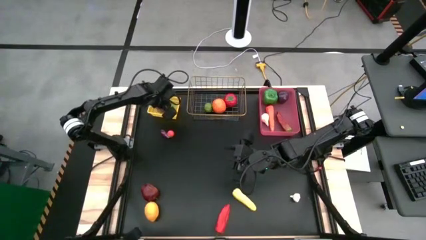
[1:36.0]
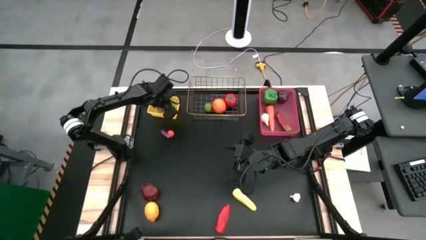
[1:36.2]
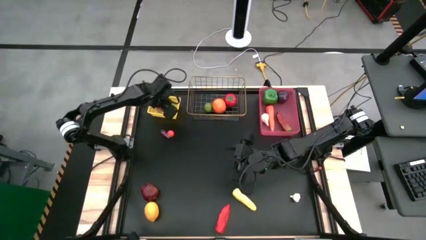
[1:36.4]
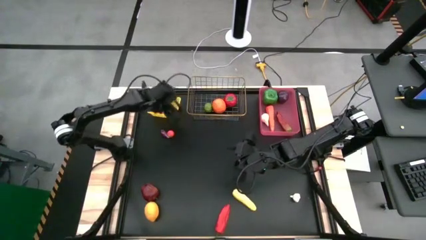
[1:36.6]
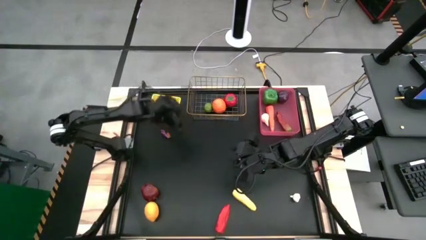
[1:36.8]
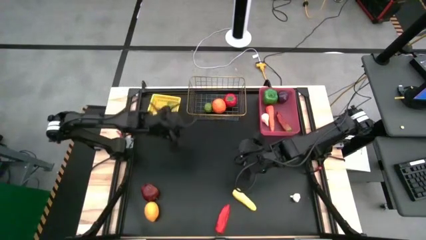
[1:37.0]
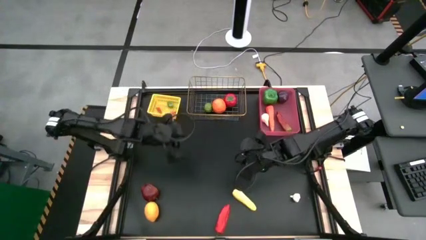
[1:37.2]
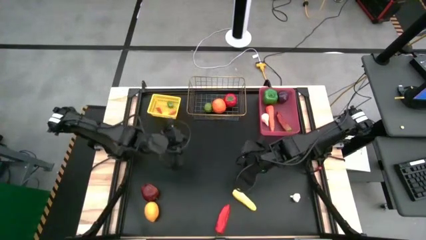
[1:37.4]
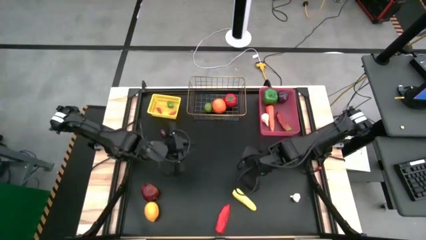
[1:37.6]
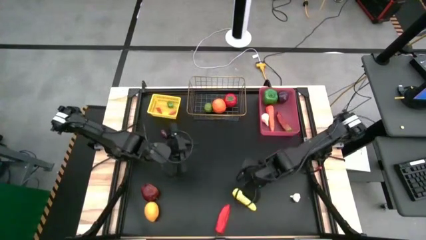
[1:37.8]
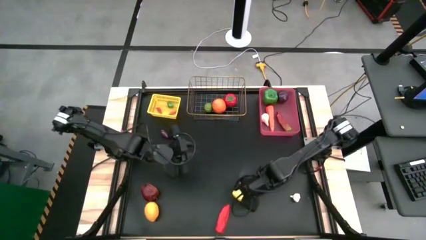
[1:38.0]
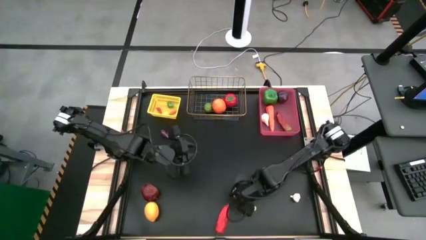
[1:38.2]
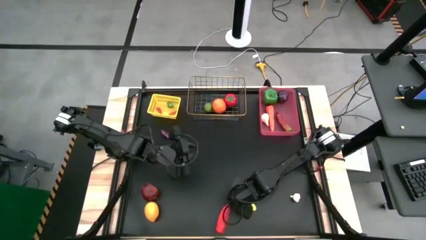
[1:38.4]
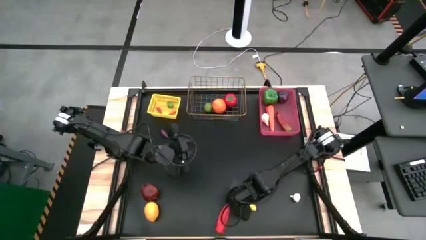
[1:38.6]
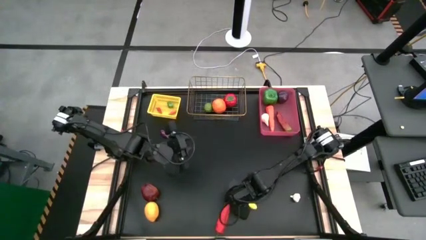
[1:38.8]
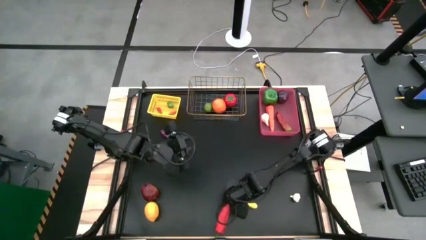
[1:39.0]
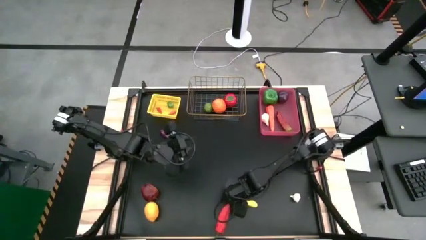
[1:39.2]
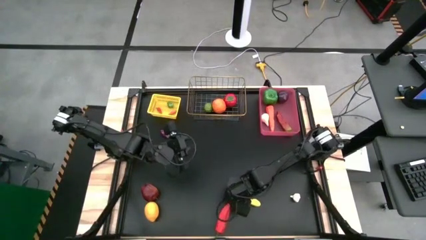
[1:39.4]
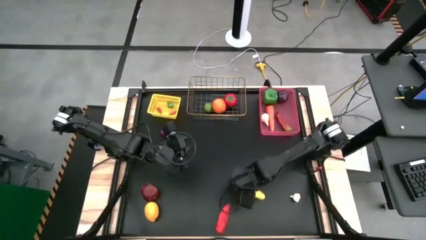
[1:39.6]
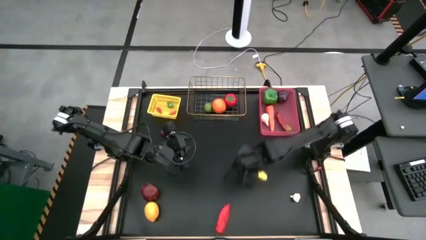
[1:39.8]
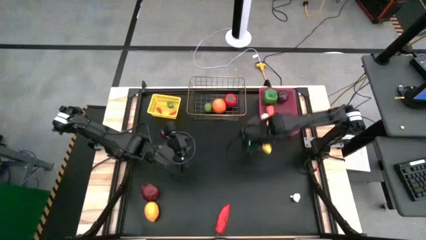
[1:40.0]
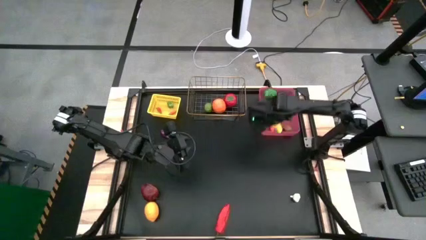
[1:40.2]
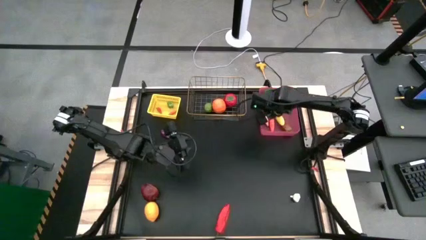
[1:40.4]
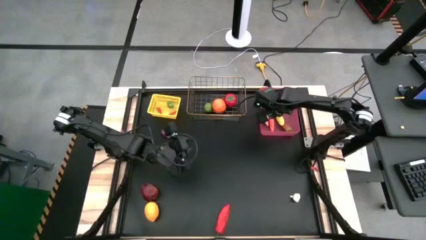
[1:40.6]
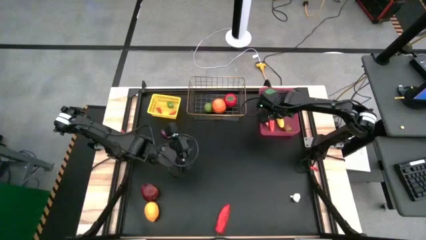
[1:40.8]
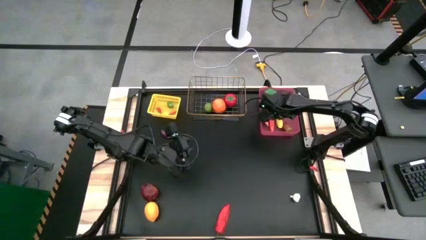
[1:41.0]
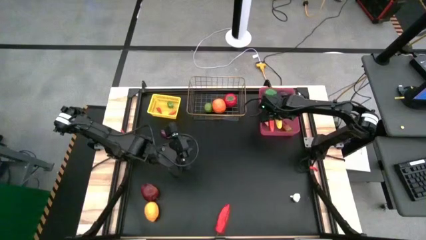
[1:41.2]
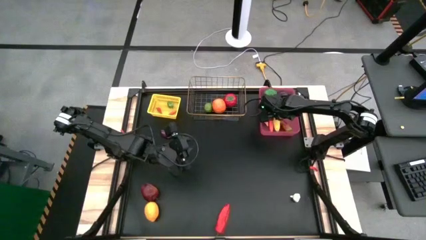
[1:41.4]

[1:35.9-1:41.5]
Task: Sort produce into baskets
Put the large yellow corn into the pink bin

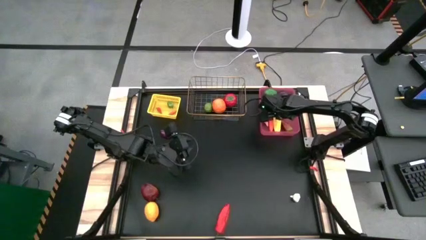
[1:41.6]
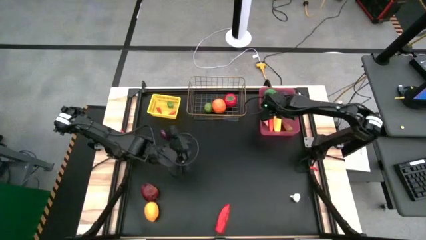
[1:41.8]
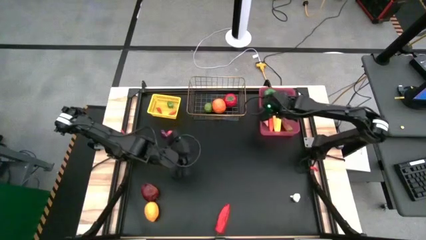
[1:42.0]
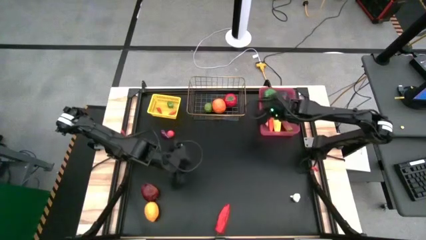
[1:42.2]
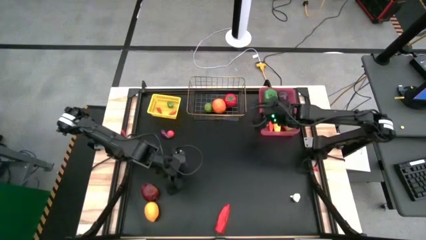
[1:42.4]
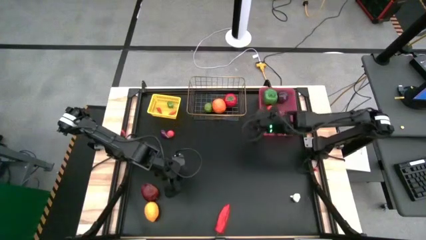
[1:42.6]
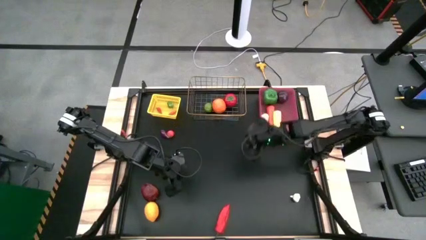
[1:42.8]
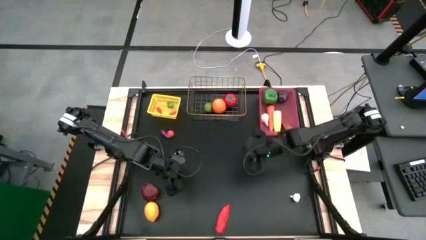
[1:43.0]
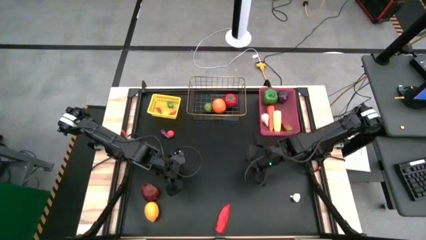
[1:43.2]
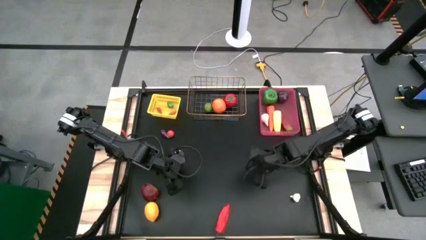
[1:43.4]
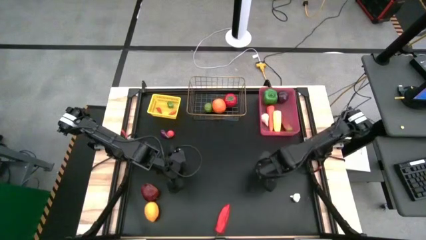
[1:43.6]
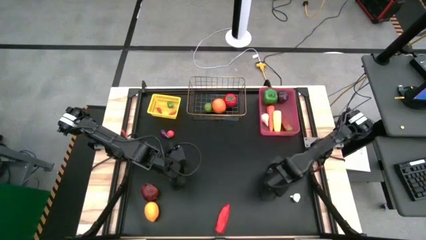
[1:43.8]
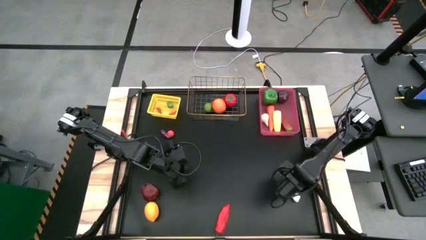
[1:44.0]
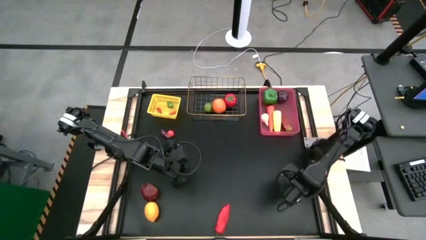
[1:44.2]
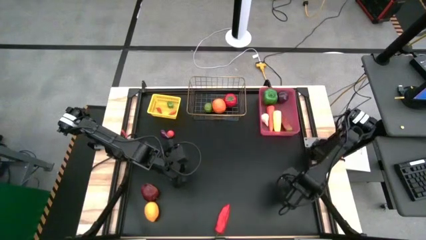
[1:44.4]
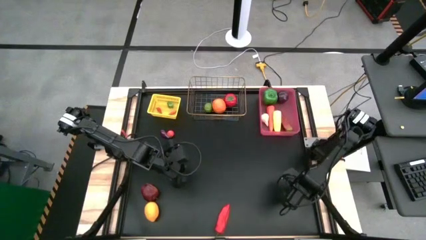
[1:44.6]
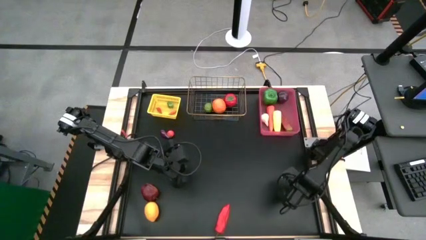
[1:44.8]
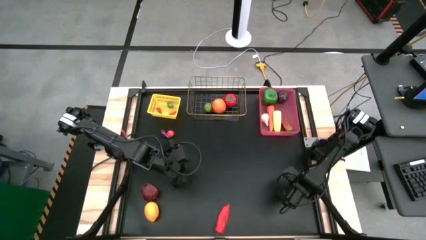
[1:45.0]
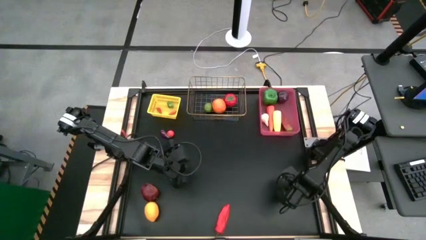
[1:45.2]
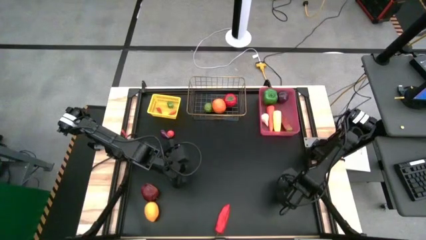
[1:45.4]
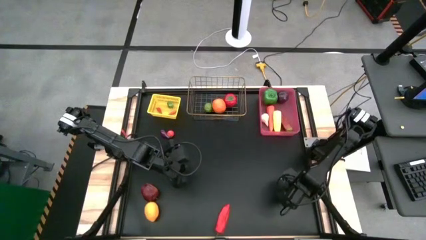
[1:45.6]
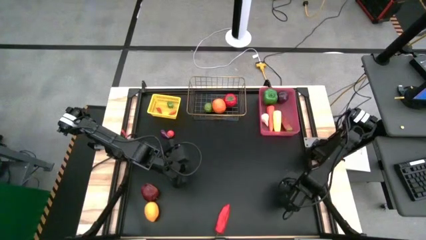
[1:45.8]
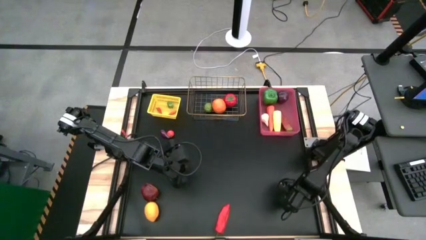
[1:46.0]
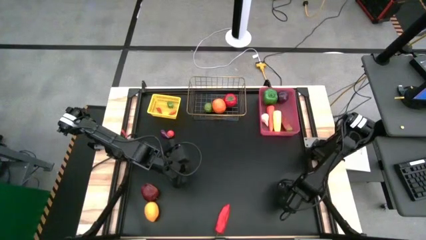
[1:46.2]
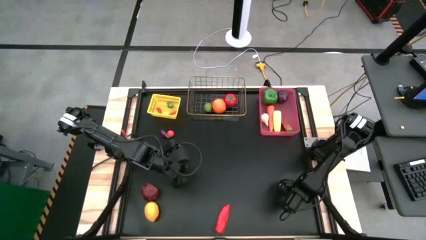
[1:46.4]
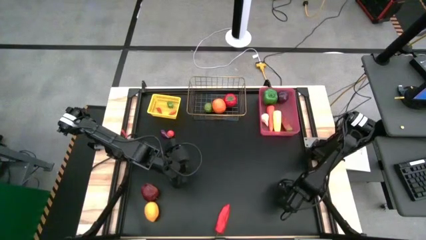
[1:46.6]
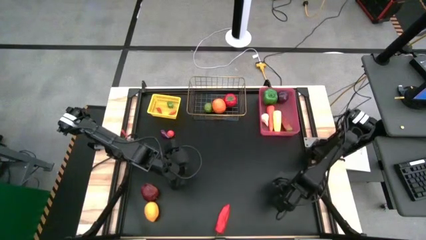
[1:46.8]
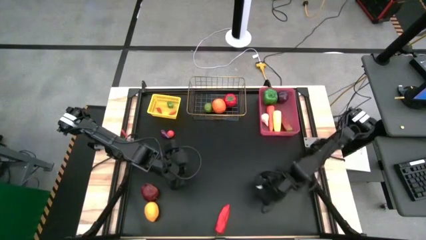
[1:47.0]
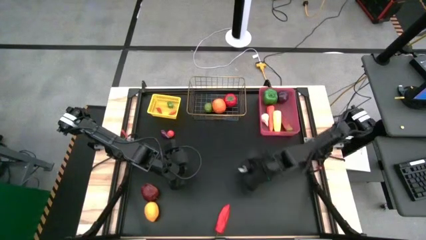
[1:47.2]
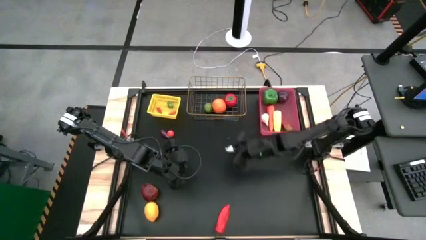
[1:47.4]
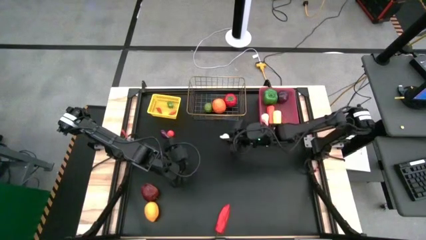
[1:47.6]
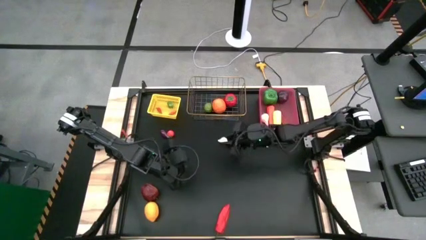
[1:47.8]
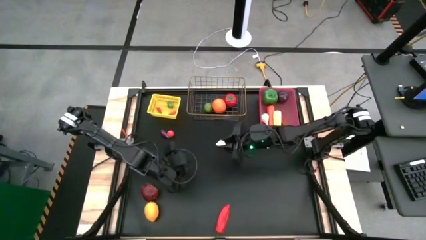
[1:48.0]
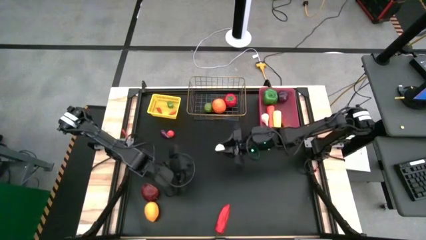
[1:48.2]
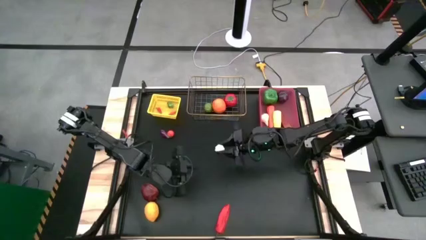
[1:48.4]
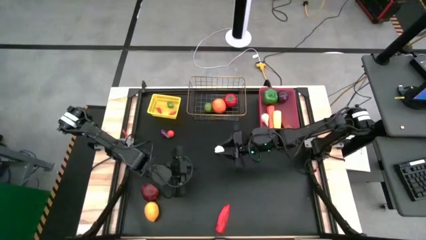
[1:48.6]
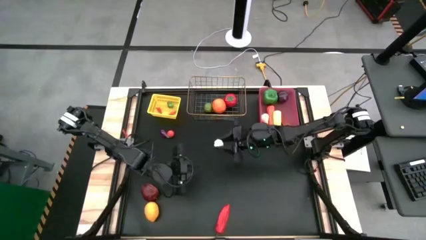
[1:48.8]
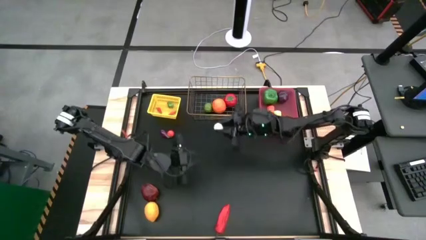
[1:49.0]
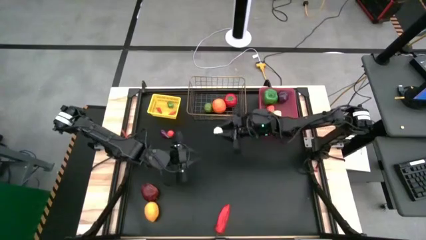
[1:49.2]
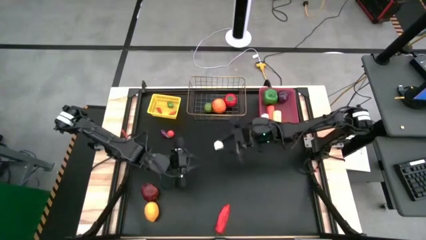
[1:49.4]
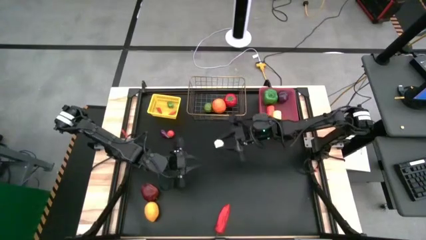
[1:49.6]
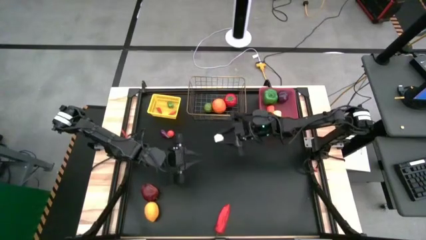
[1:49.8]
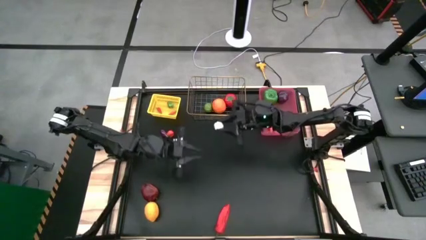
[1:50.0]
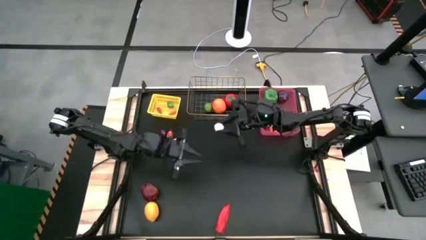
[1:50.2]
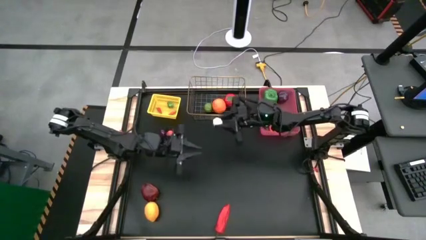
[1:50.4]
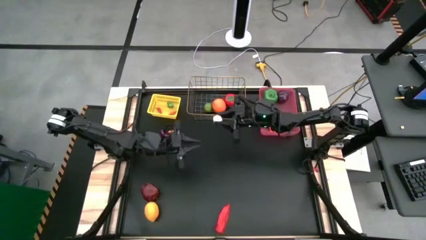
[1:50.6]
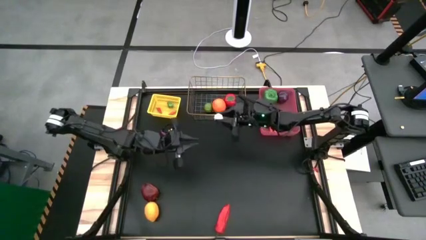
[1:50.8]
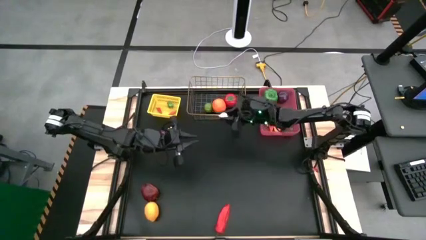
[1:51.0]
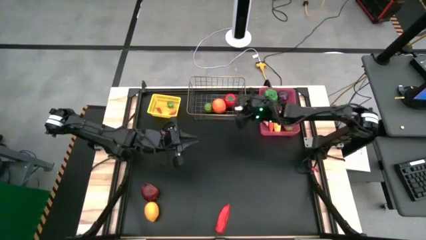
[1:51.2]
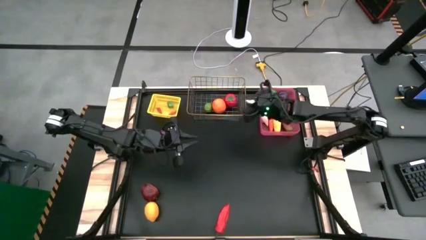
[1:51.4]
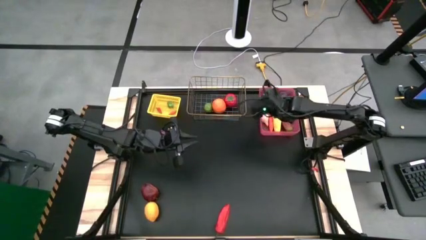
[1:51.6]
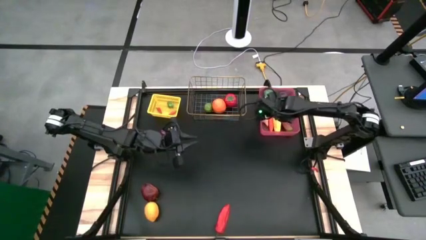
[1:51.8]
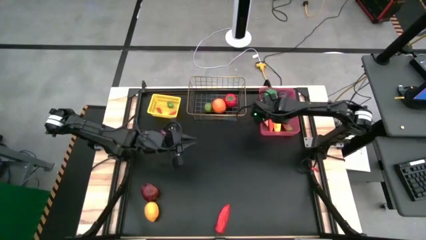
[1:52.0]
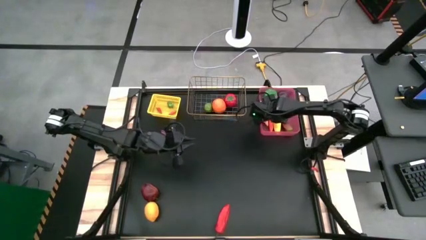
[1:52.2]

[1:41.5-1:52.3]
Put the large white garlic into the pink bin
